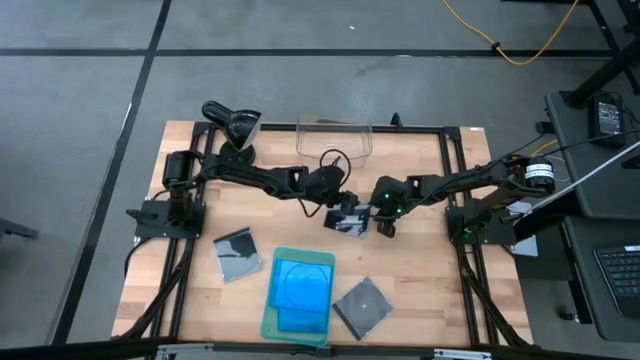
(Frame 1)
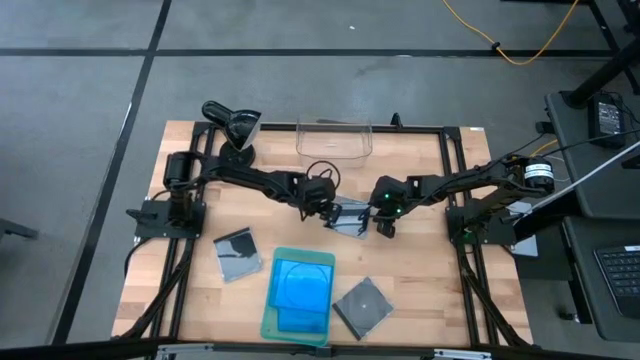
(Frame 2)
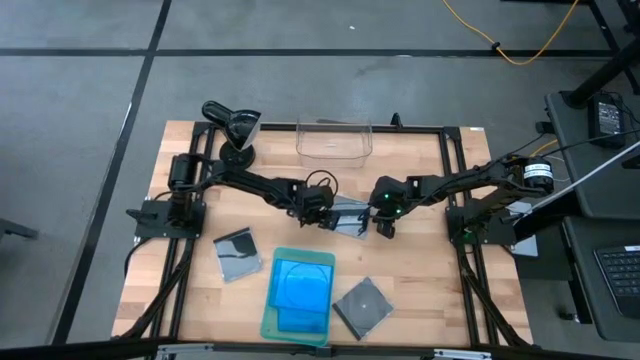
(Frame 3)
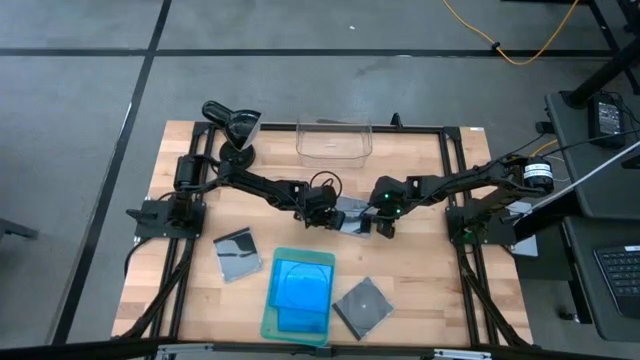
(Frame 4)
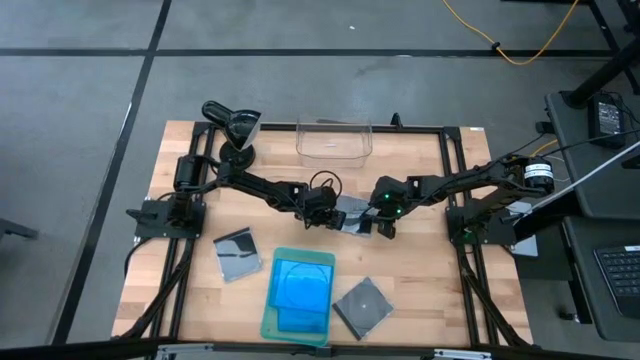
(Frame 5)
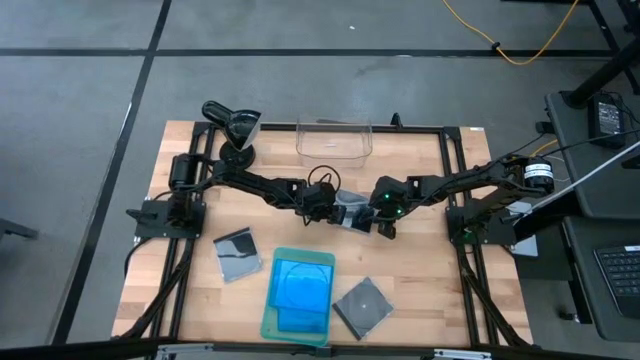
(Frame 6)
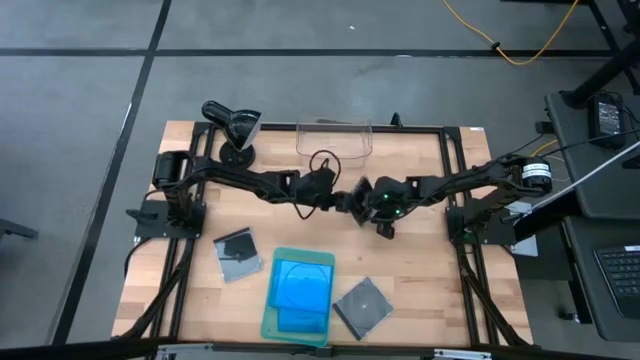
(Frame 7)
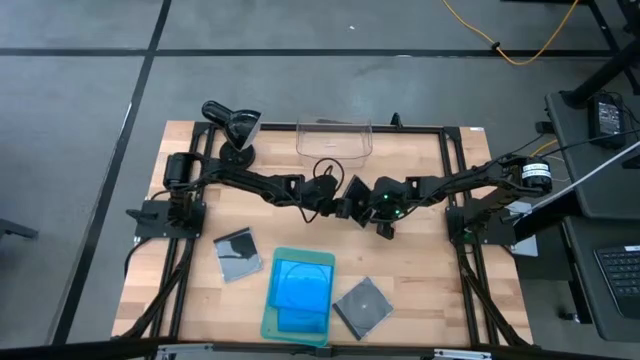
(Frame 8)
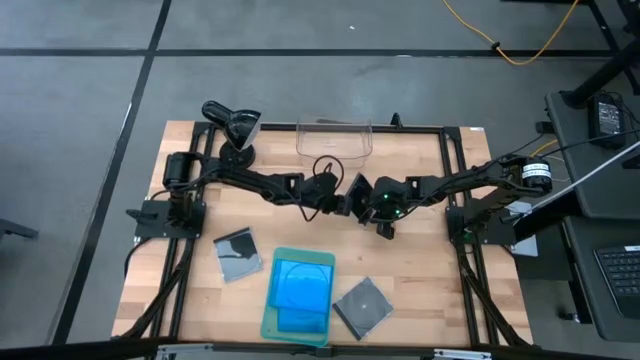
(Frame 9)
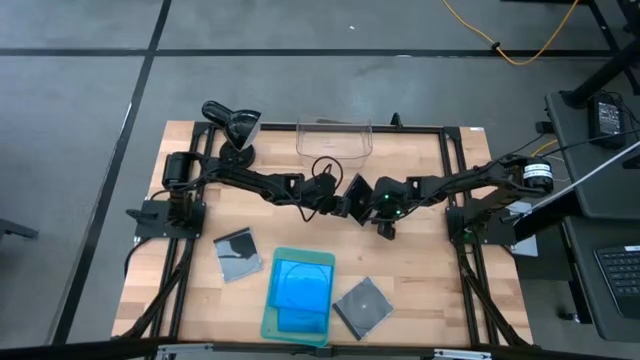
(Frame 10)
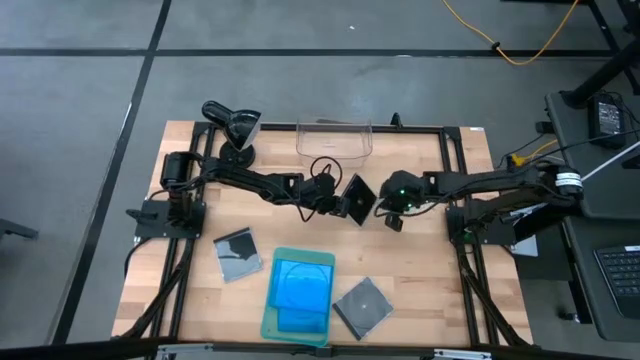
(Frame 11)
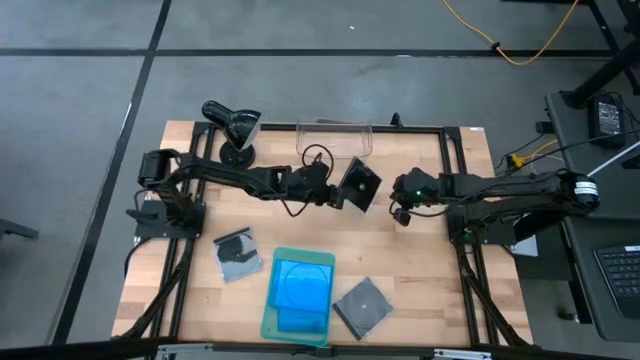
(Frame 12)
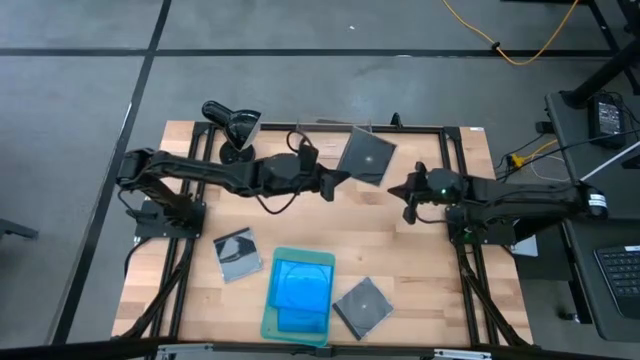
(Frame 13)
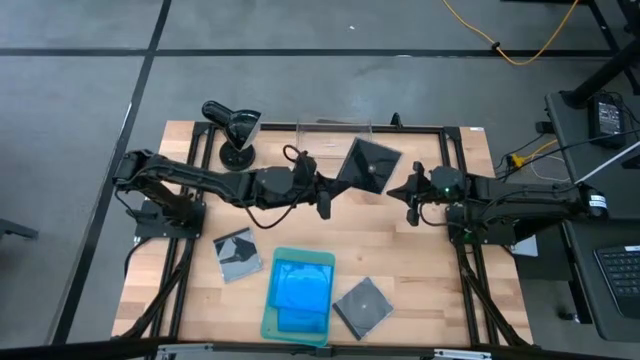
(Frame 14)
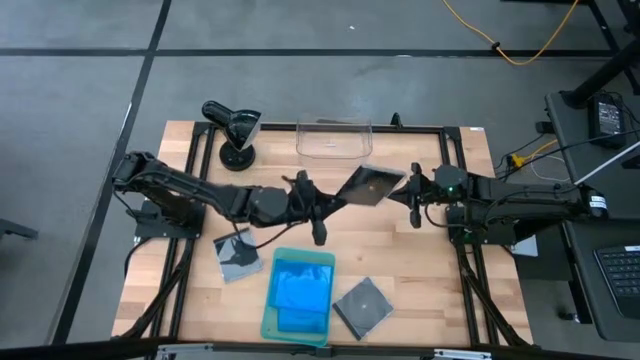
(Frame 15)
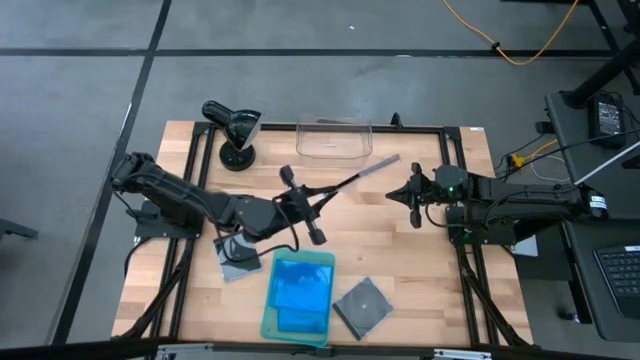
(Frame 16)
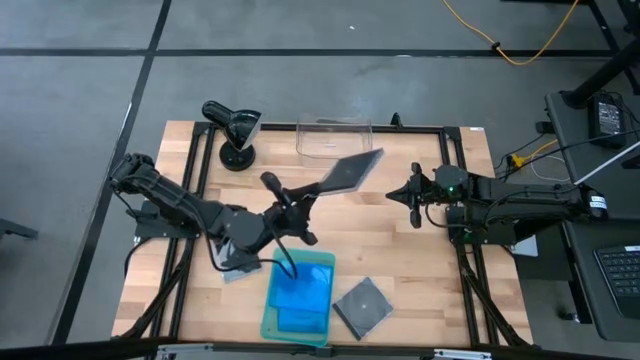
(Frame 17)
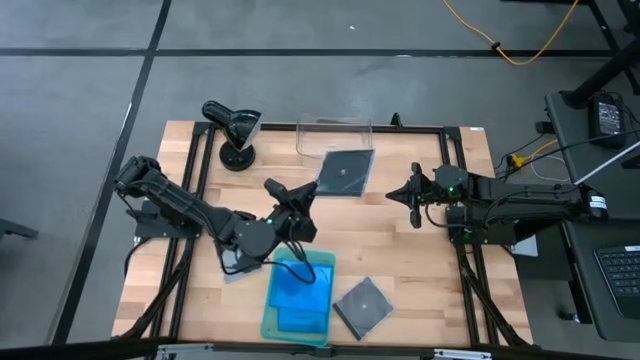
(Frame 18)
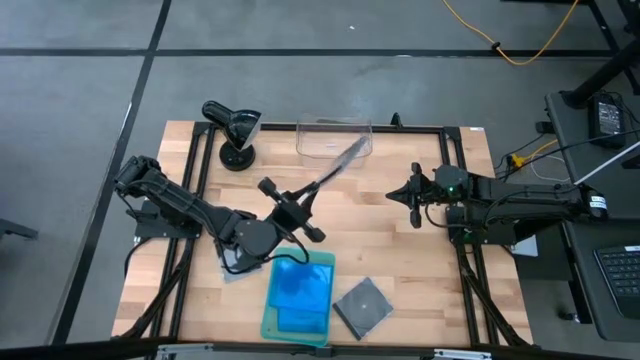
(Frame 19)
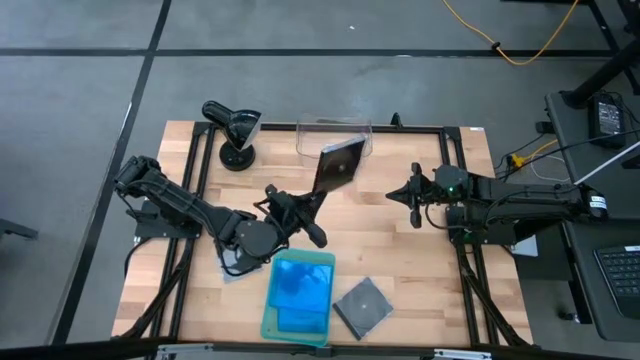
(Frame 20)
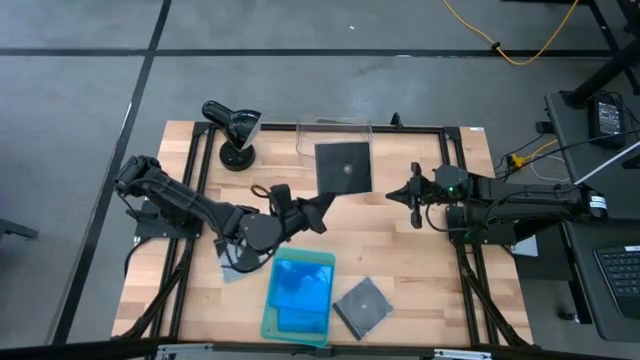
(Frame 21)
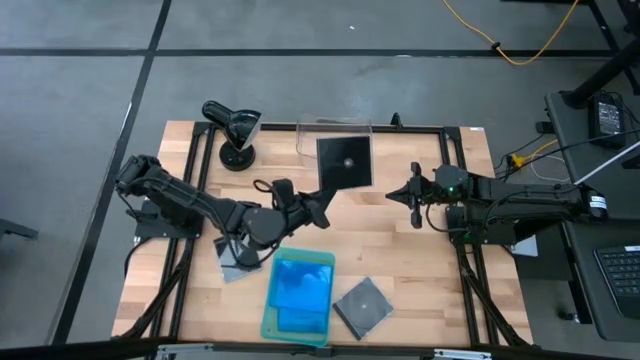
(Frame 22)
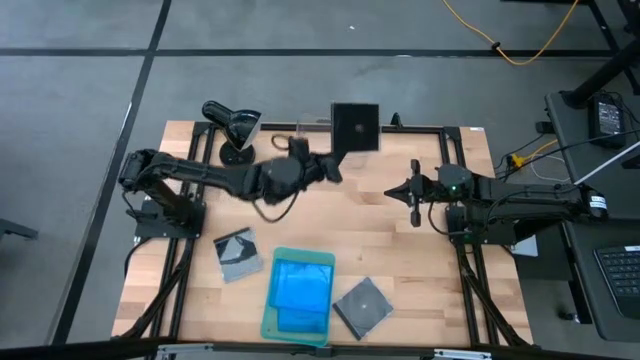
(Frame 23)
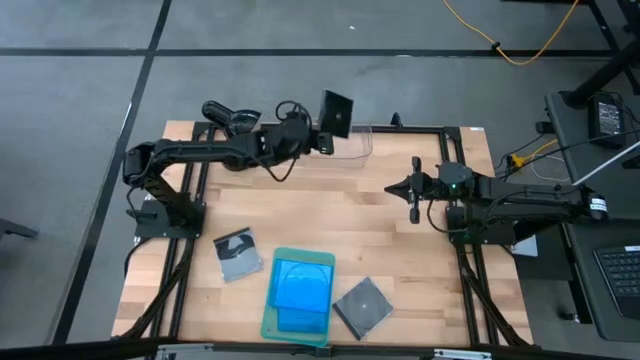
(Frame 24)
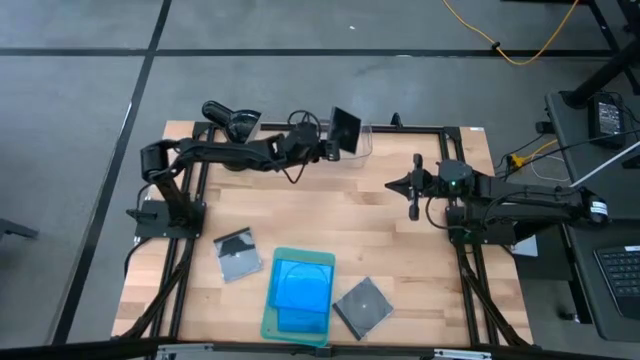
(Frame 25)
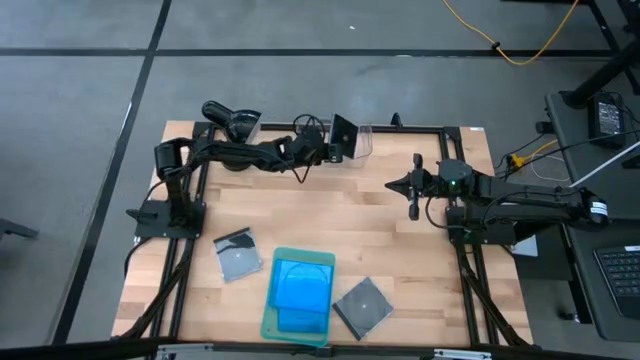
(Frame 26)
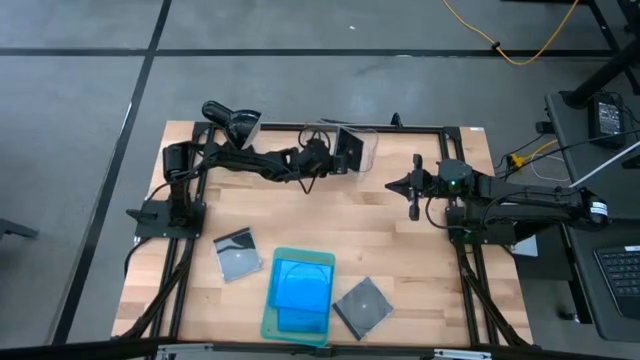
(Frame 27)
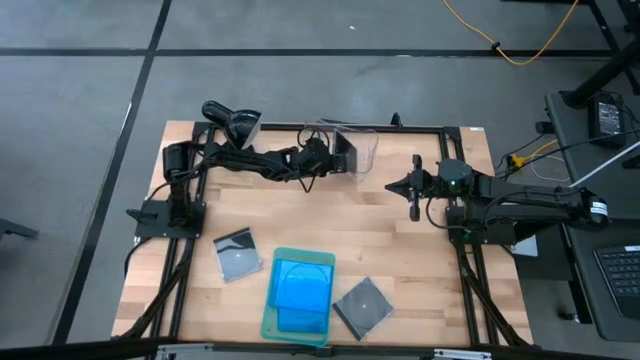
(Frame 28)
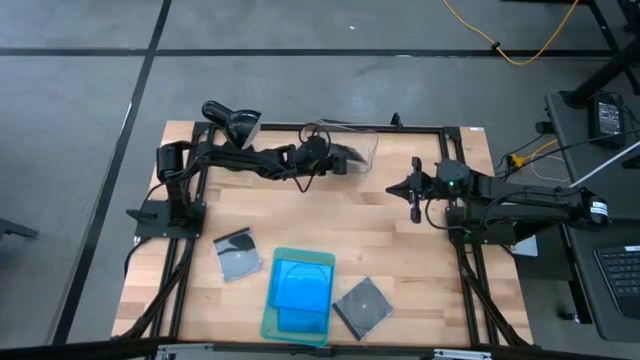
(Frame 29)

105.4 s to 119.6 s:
Task: Pick & place jewel cases by type
Put the top right black cd case into the transparent bin

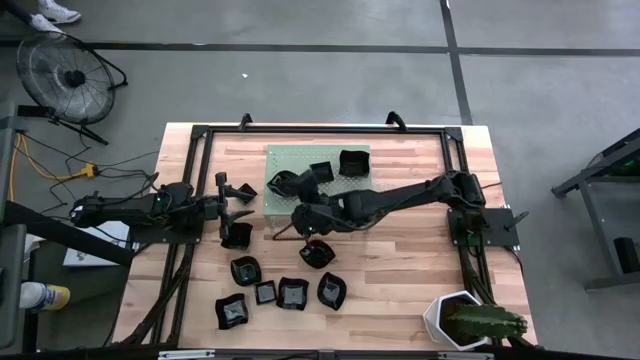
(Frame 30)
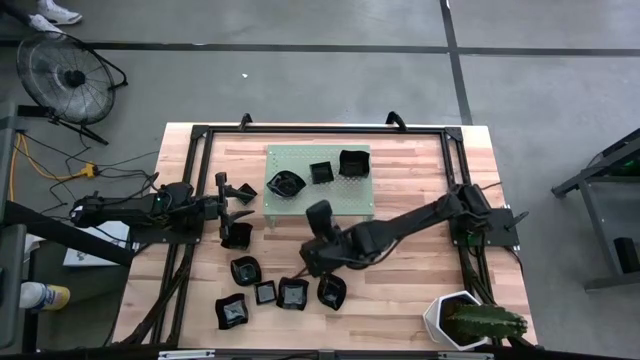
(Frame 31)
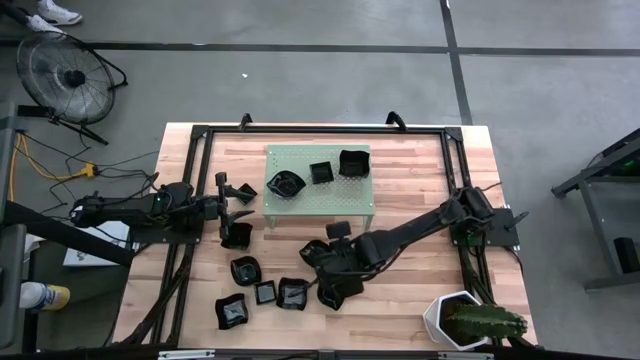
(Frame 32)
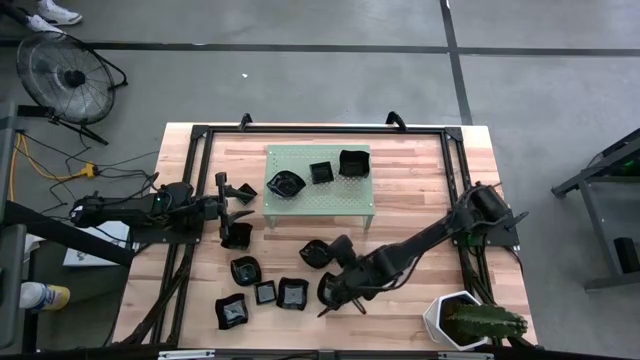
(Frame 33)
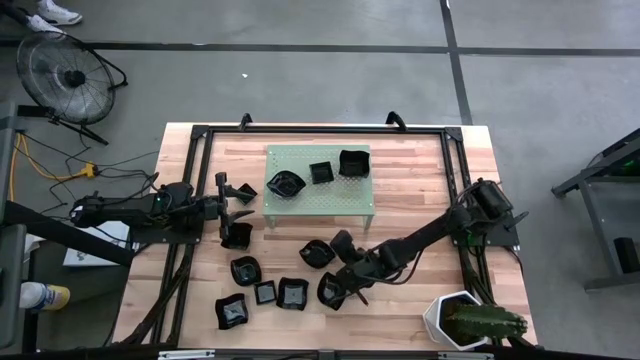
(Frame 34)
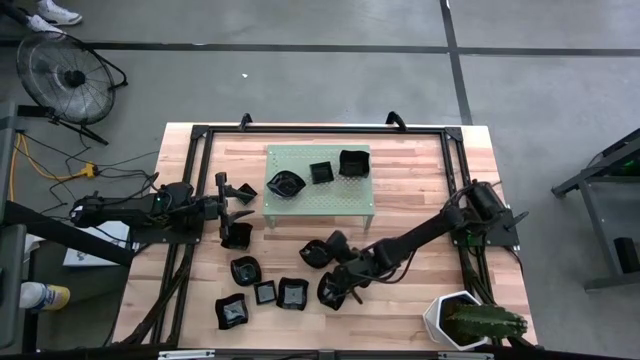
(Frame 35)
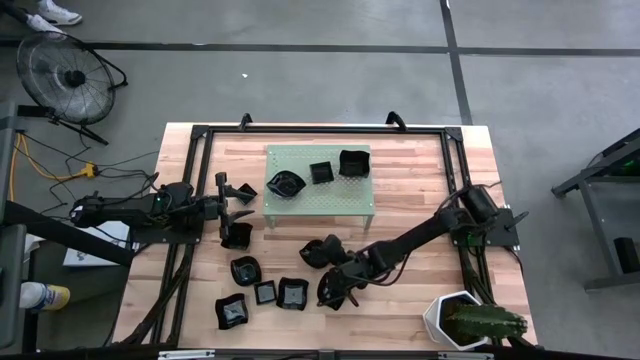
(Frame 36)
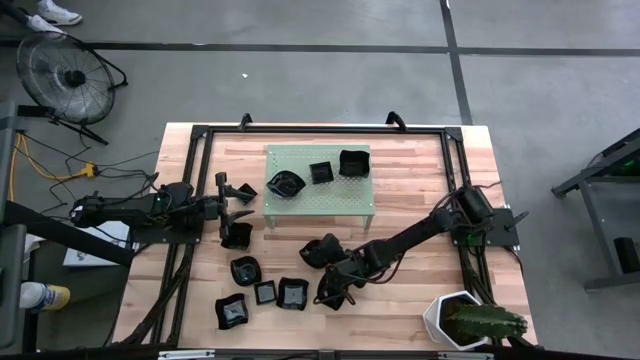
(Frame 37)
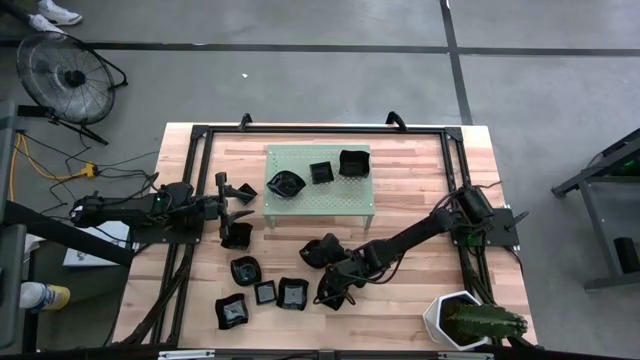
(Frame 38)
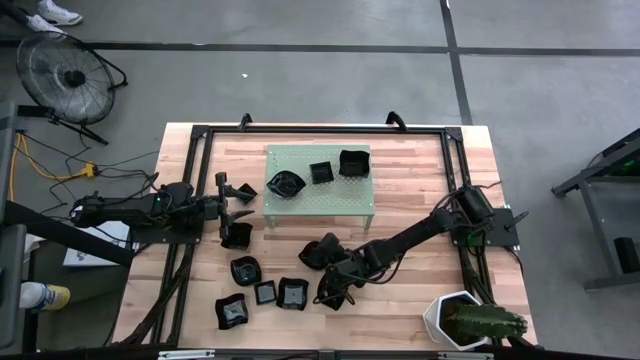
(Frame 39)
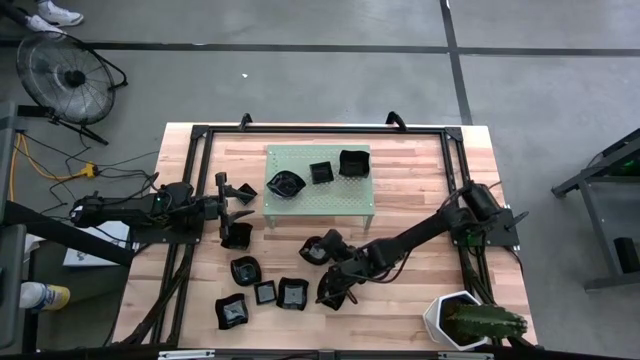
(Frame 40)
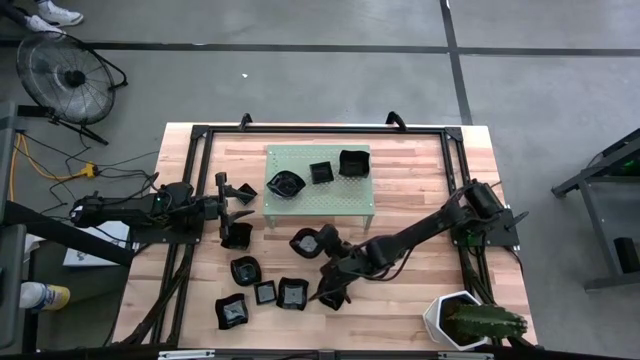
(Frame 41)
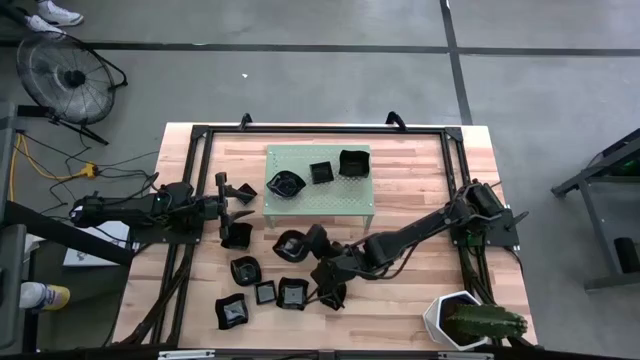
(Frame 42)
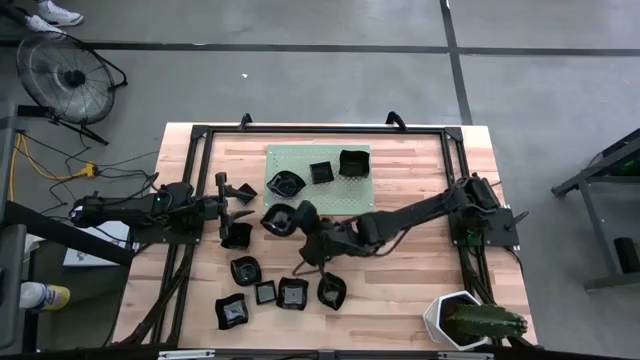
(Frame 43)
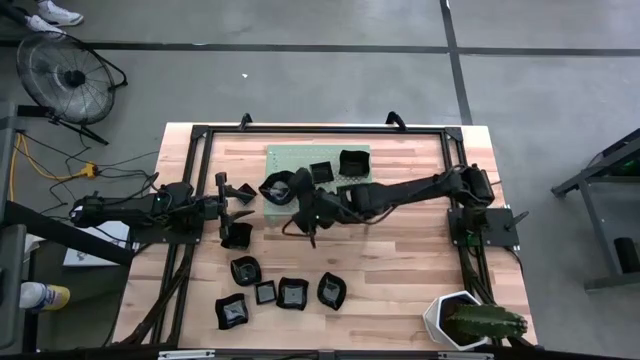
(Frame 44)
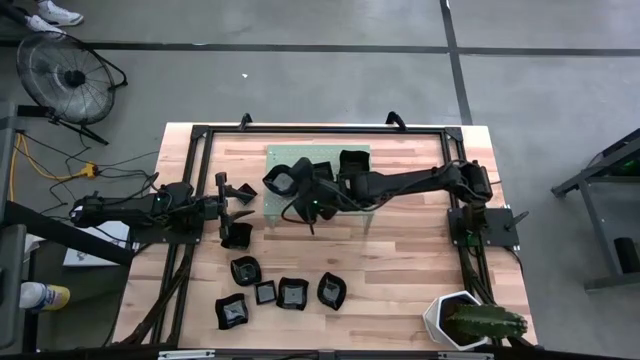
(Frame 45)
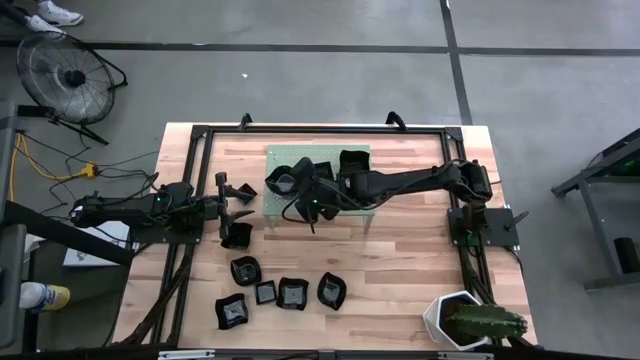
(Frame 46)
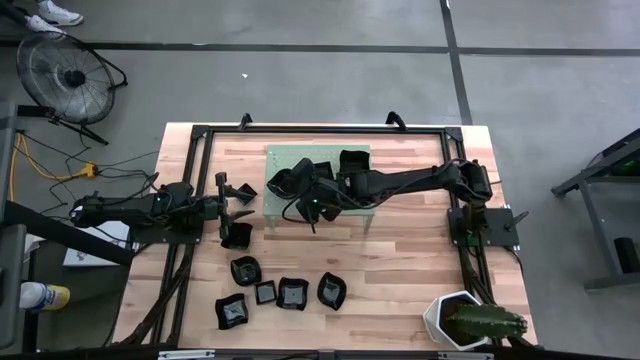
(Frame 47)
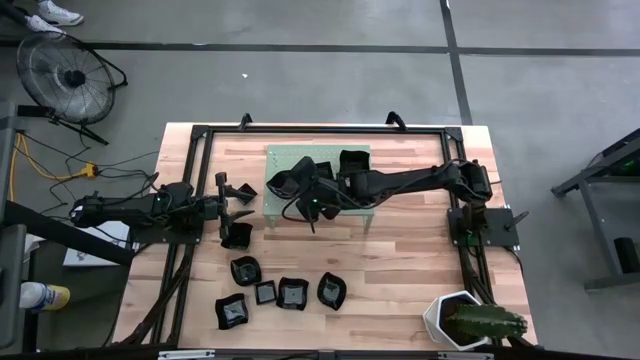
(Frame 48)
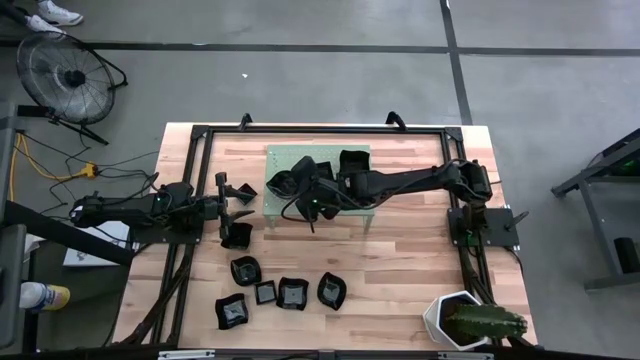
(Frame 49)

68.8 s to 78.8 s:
Task: Pick & Place Mini shaped plates
Stack the leaf-shaped plate on top of the other leaf-shaped plate on the shelf
